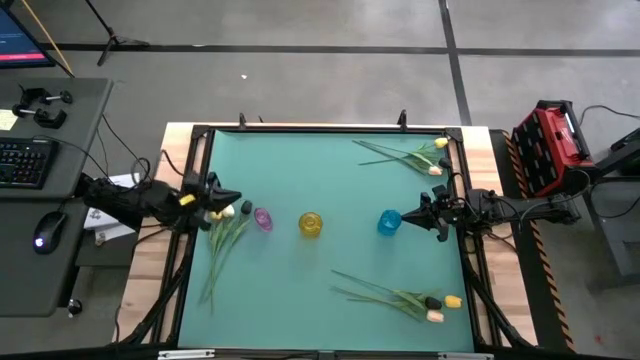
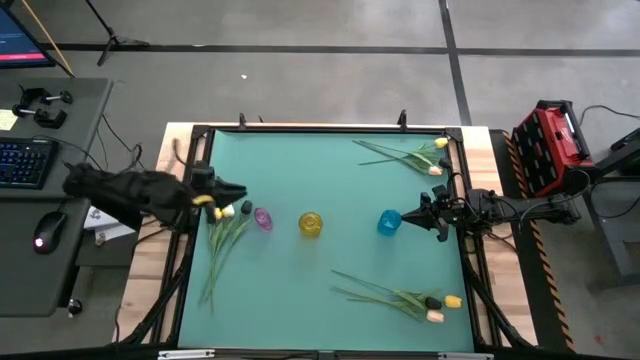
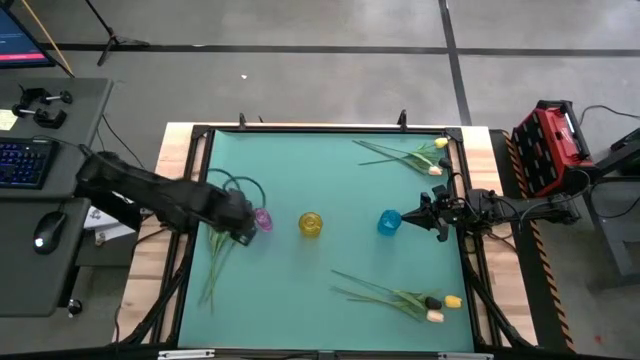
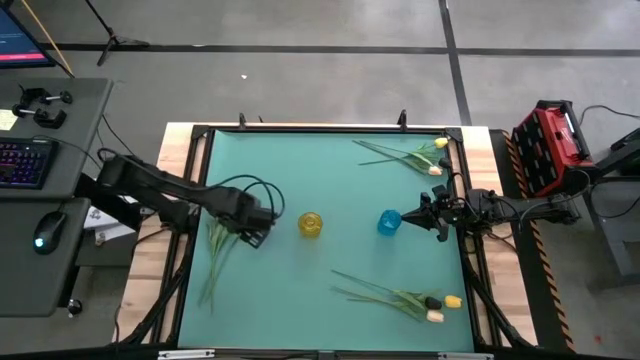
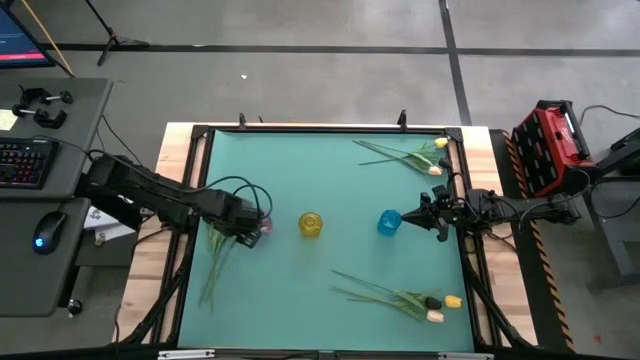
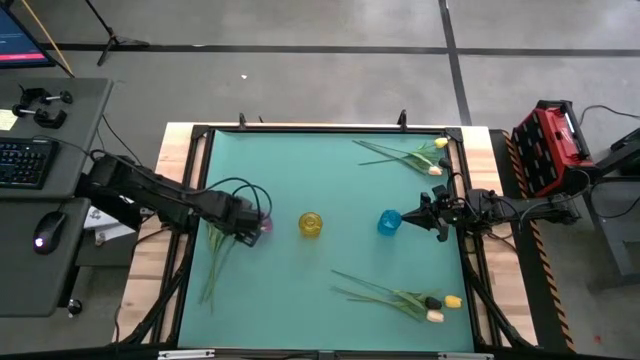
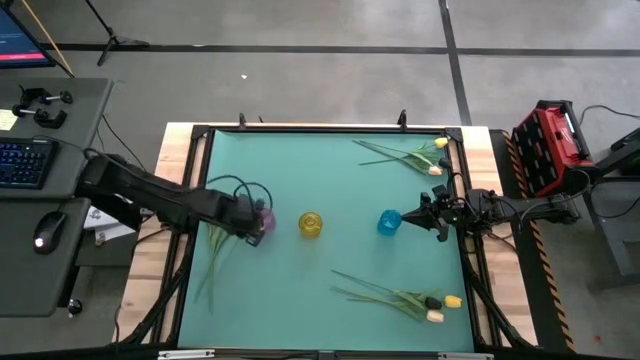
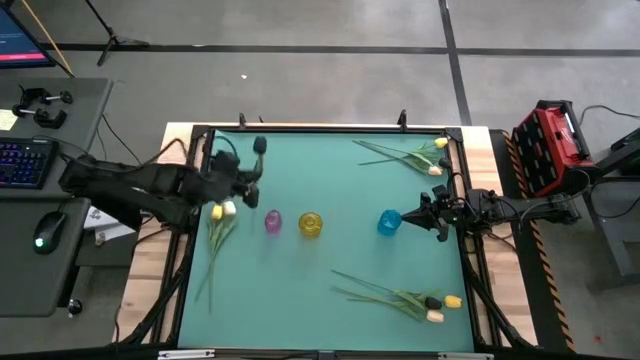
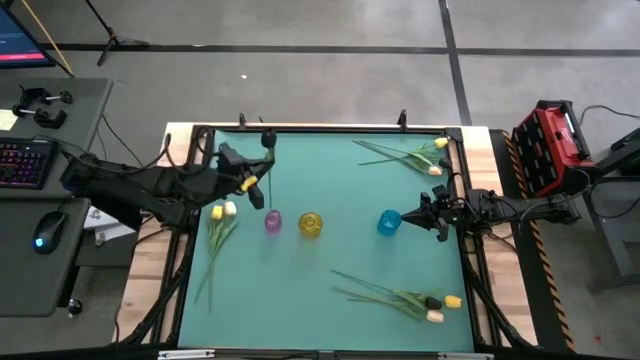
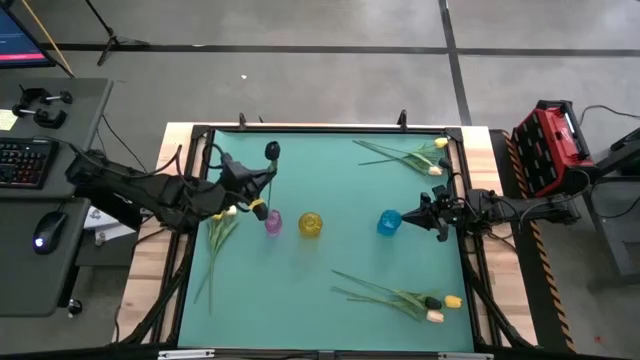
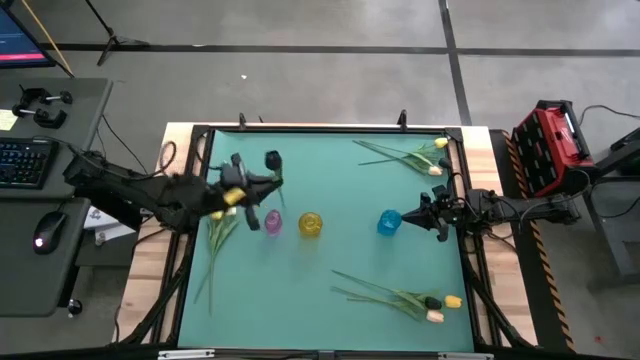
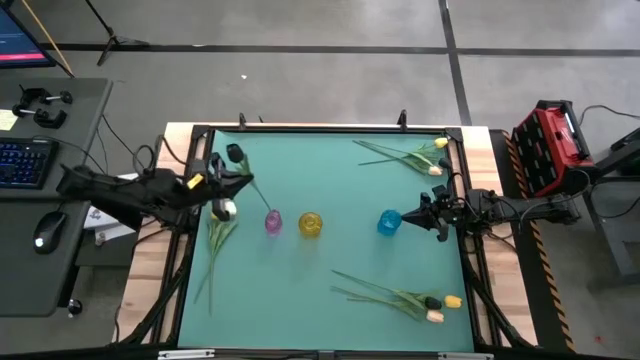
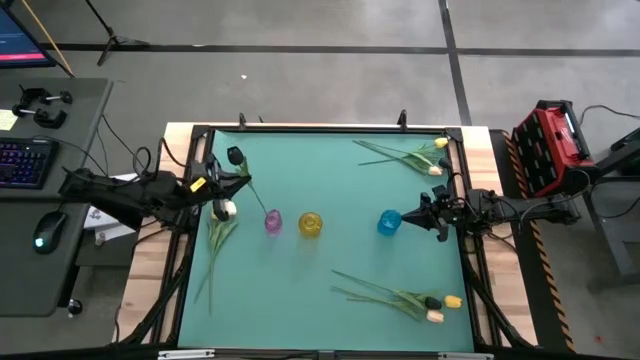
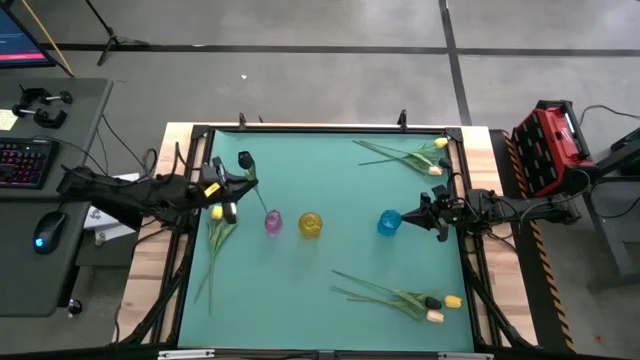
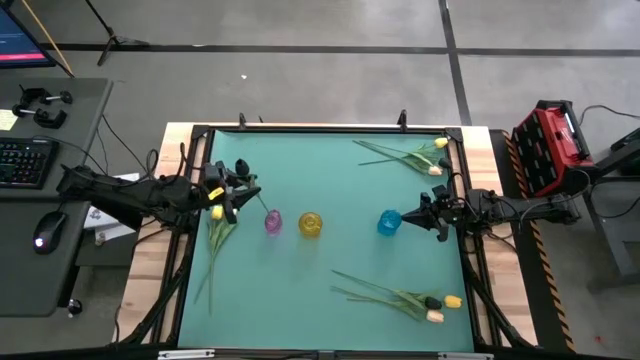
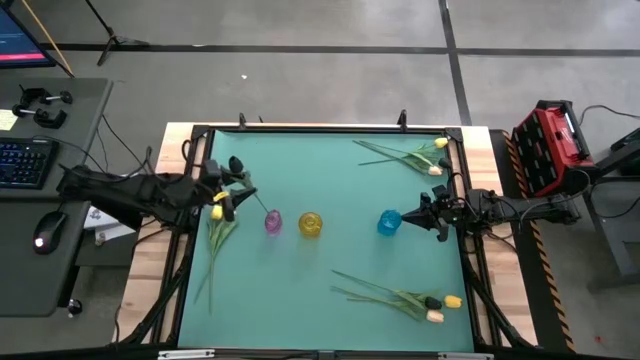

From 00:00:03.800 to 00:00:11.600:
Task: Sort flowers into vase by color
Put the middle left black tulip into the pink vase

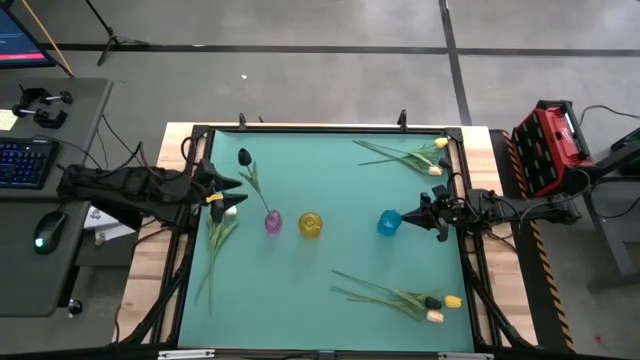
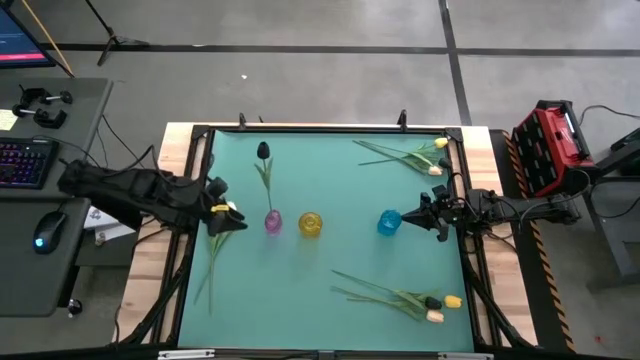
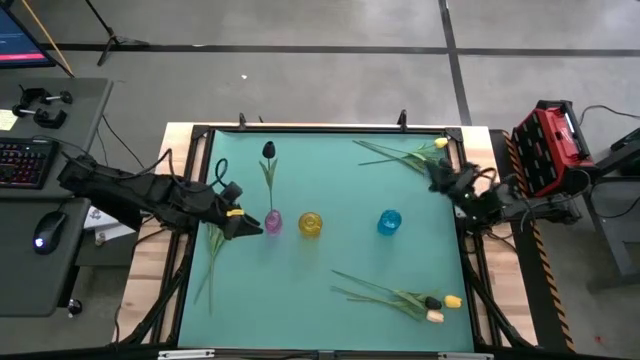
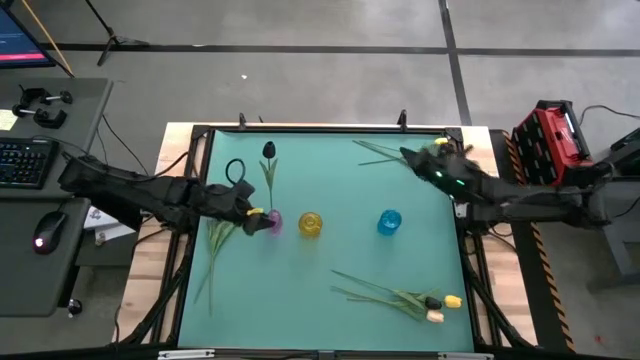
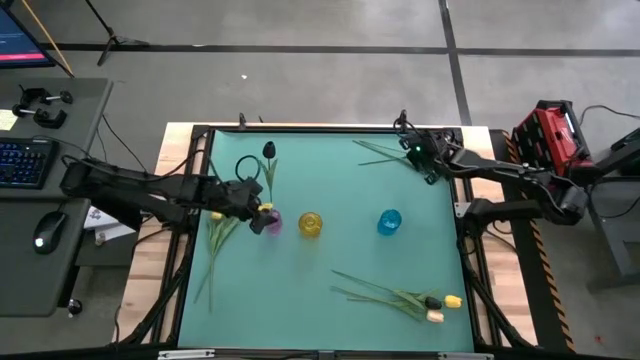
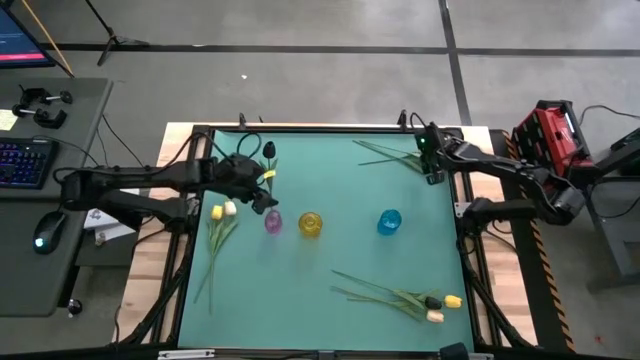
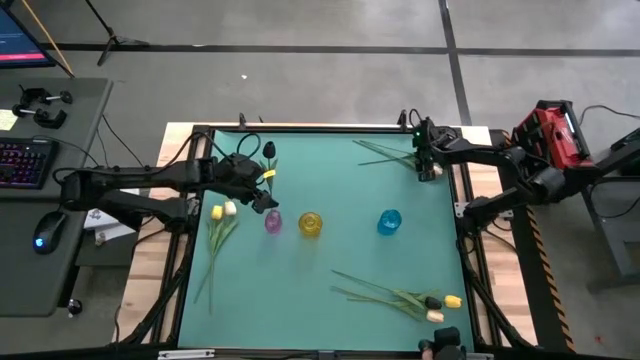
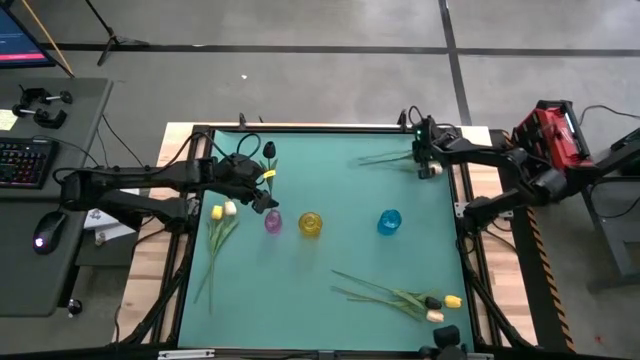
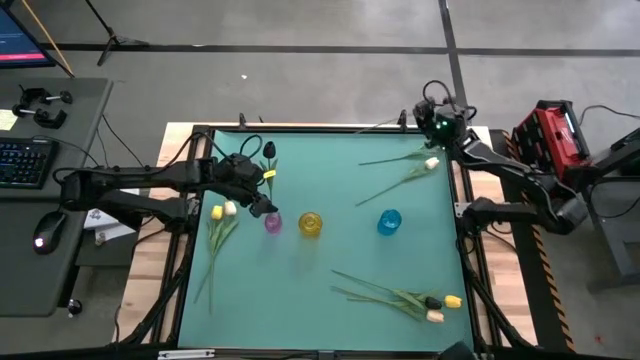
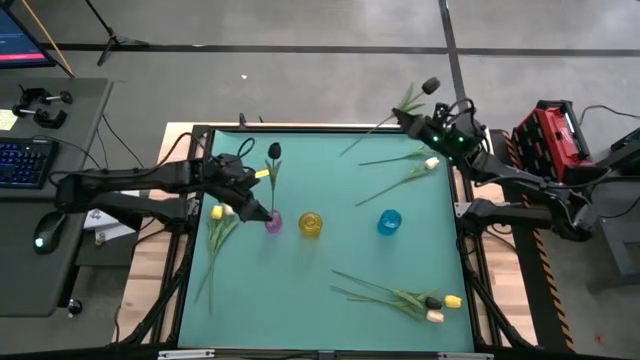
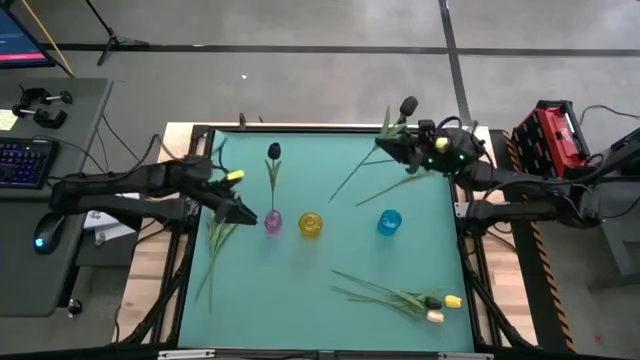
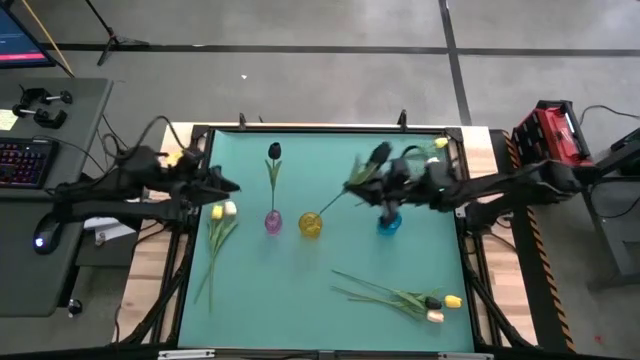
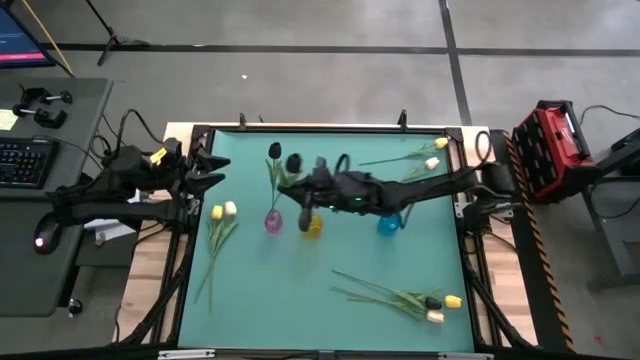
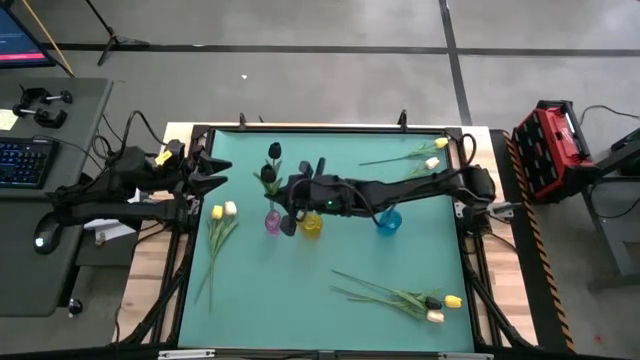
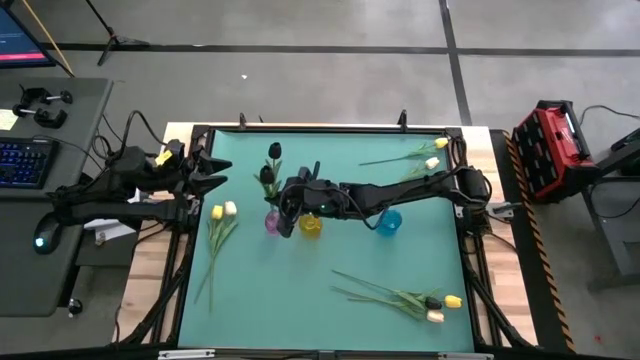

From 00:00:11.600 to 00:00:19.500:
Put the top black tulip into the pink vase

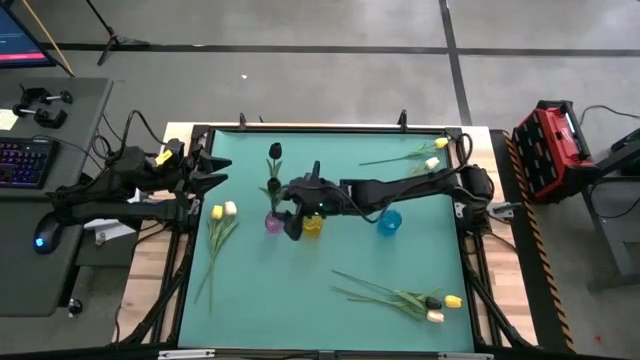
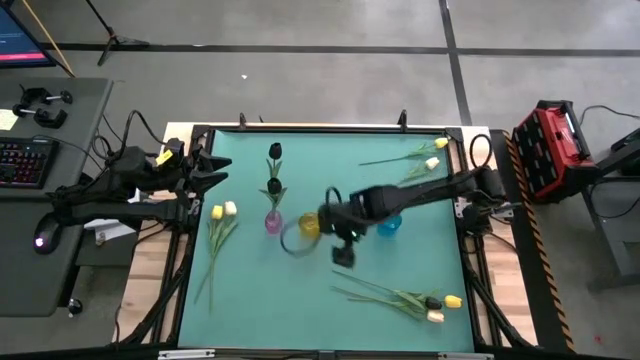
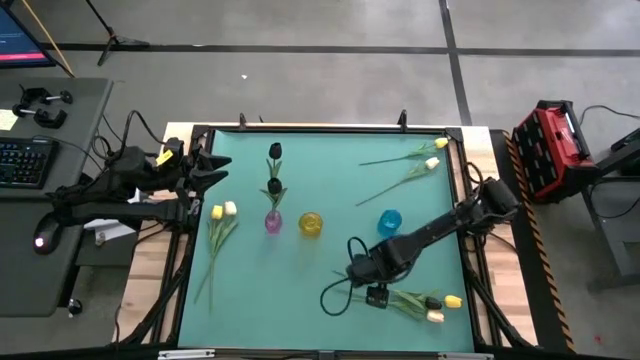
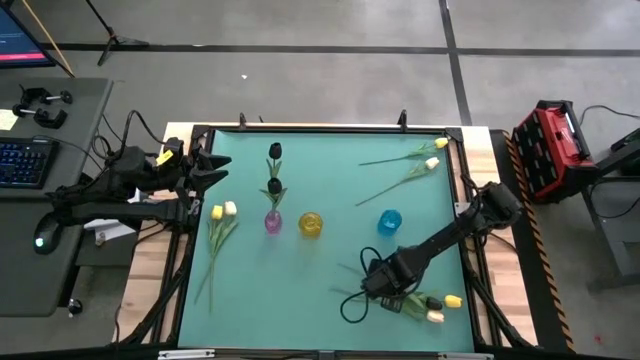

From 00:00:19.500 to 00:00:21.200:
Put the black tulip into the pink vase

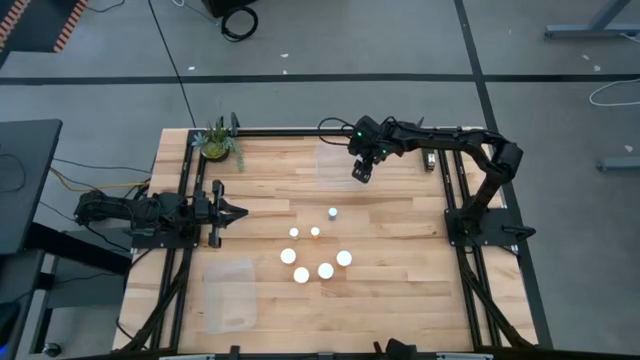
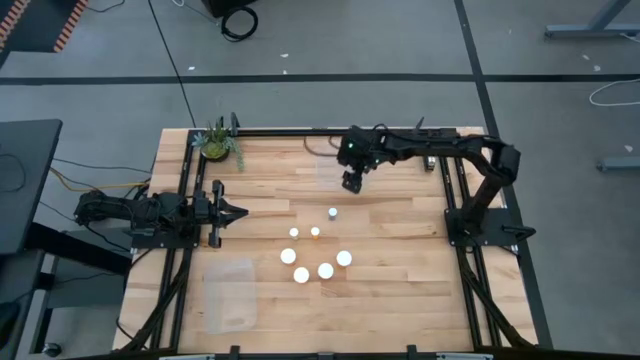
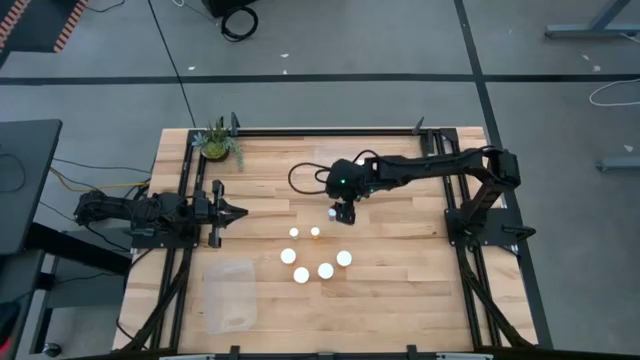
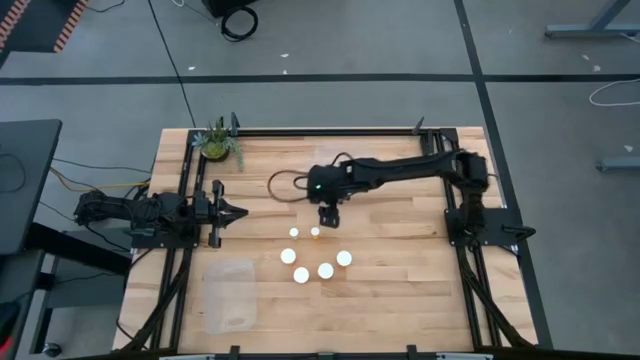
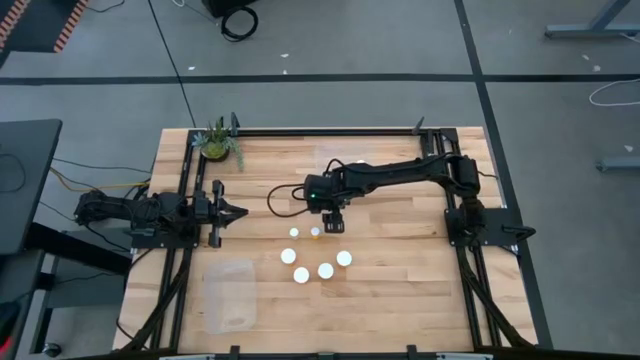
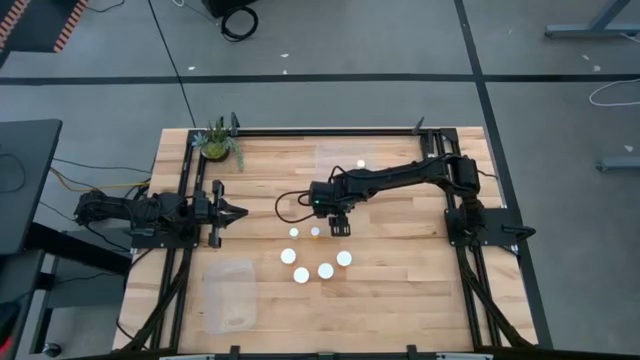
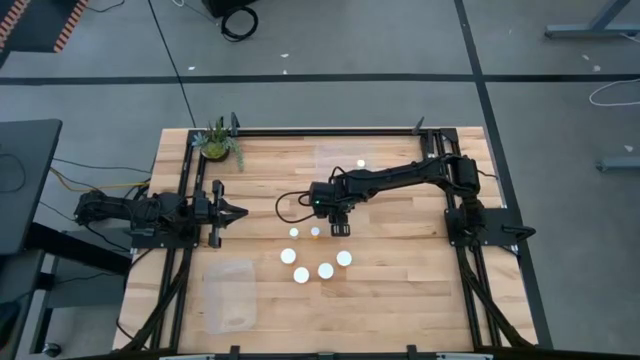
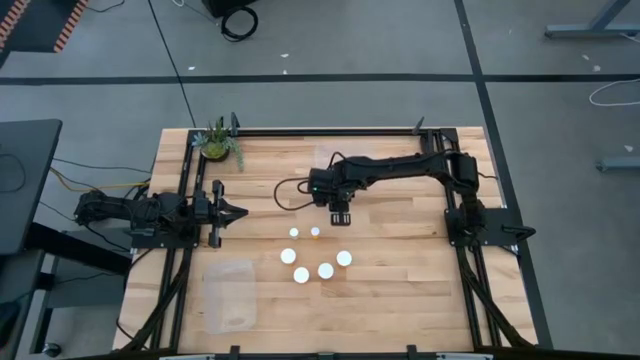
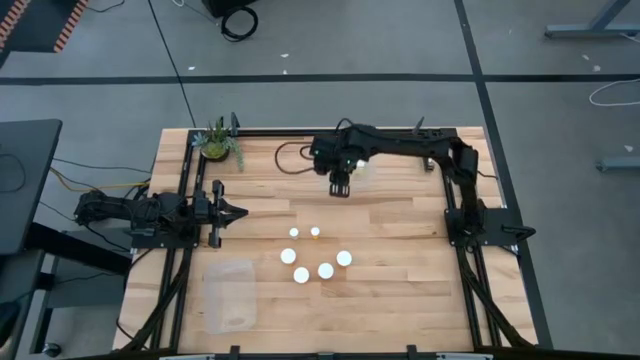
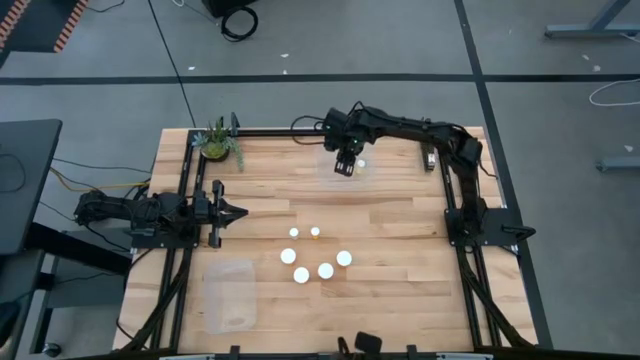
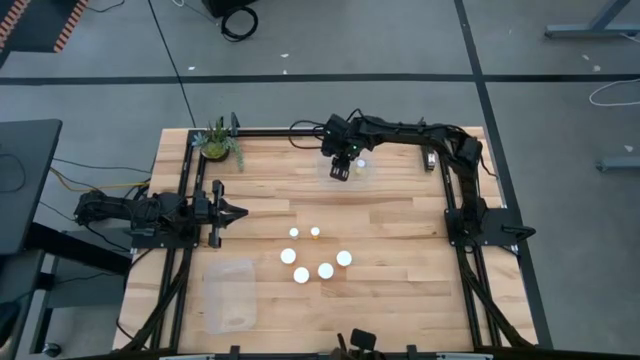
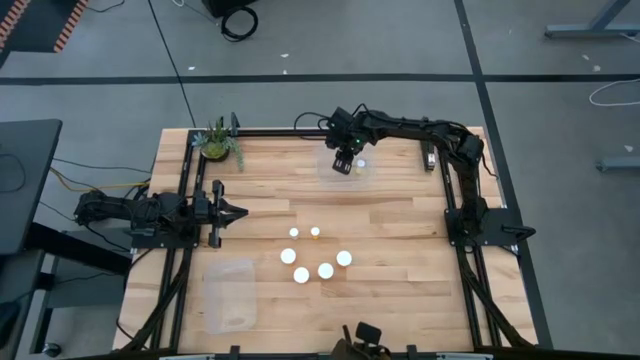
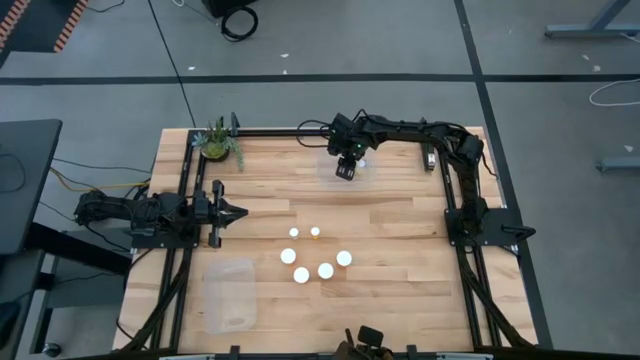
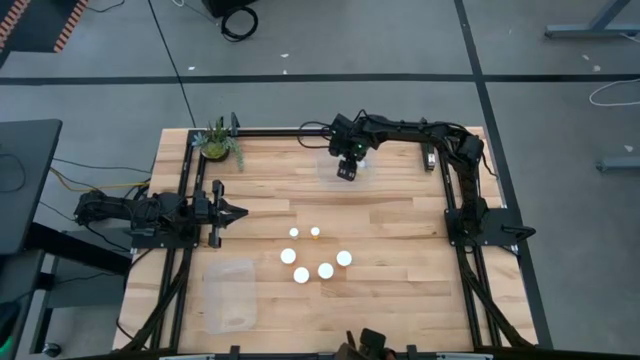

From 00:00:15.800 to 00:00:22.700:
Task: Pick and place medicine bottles into bin by pill shape (circle, oval)
Put the small blue pill bottle into the top transparent bin
